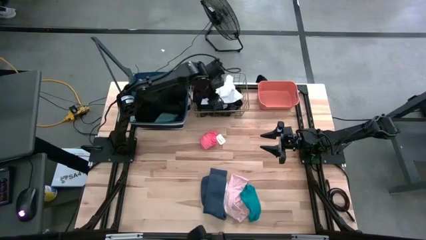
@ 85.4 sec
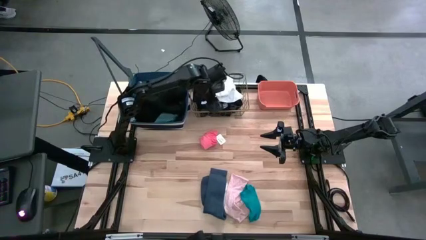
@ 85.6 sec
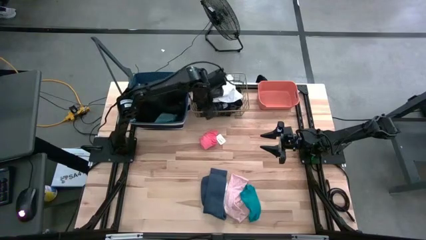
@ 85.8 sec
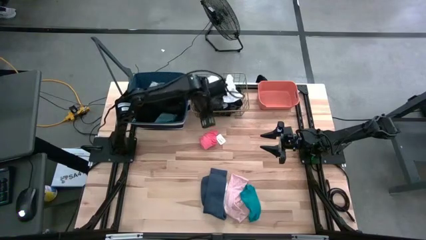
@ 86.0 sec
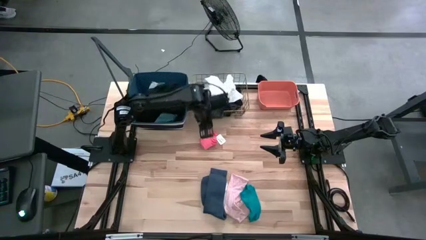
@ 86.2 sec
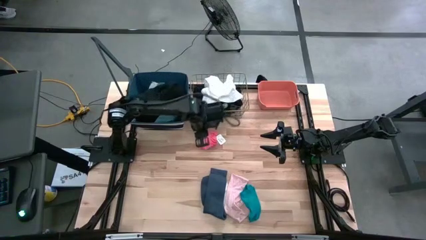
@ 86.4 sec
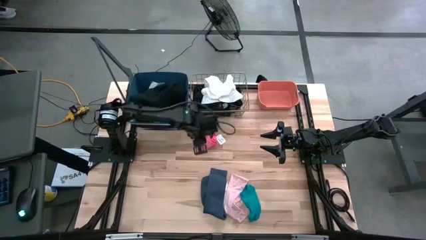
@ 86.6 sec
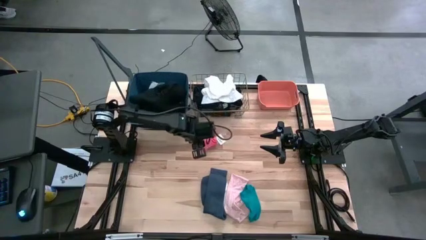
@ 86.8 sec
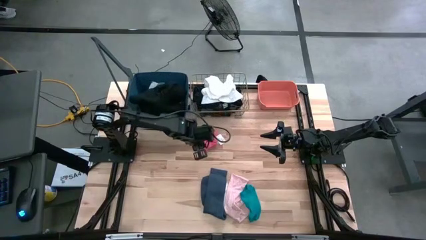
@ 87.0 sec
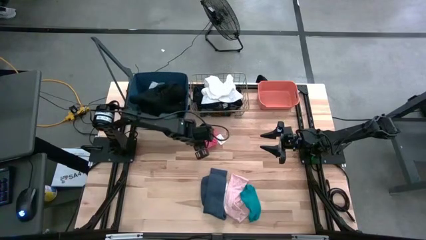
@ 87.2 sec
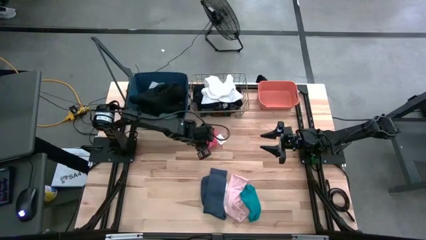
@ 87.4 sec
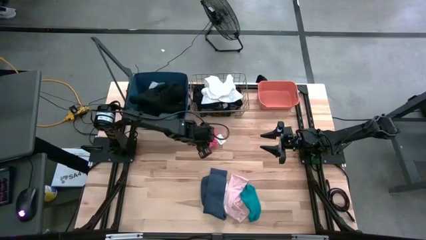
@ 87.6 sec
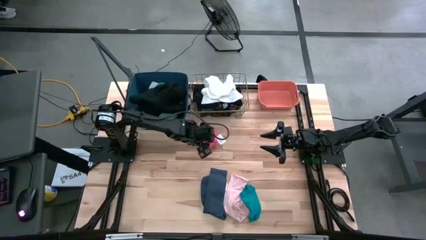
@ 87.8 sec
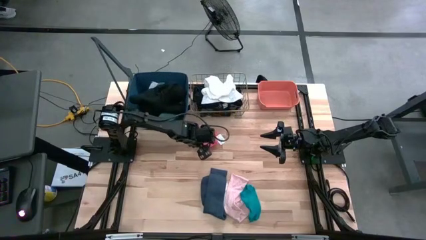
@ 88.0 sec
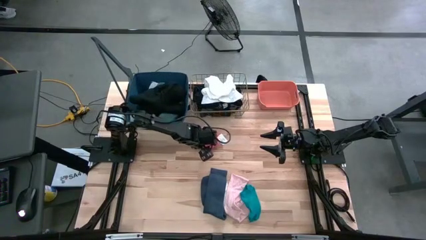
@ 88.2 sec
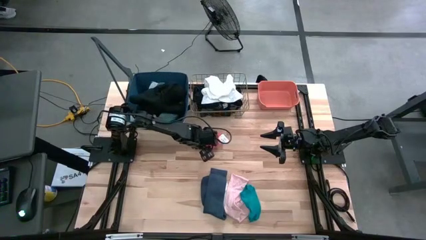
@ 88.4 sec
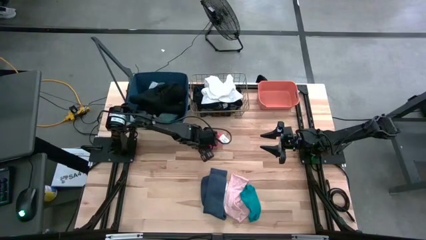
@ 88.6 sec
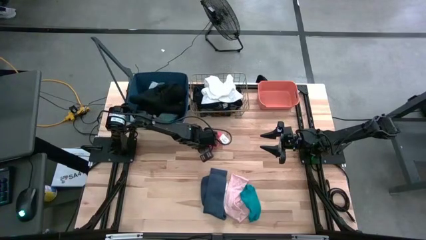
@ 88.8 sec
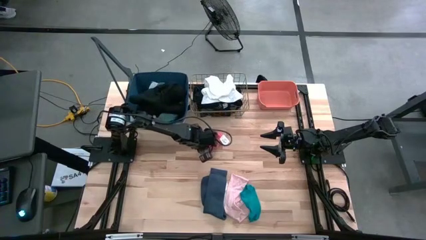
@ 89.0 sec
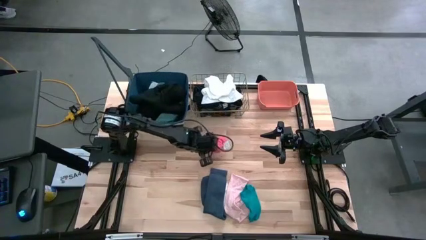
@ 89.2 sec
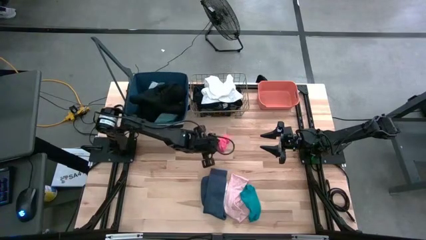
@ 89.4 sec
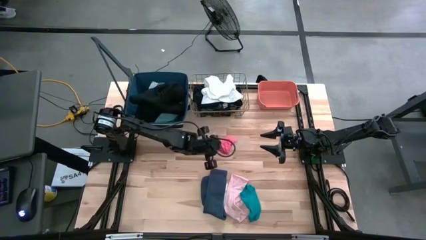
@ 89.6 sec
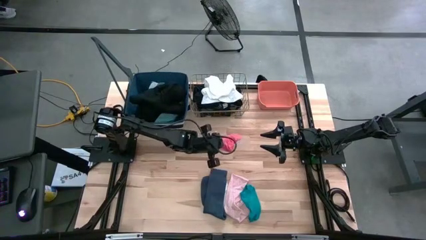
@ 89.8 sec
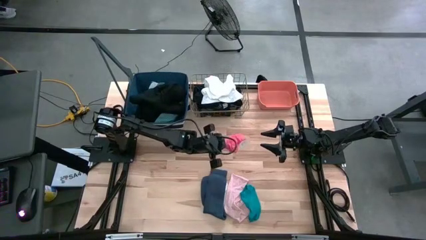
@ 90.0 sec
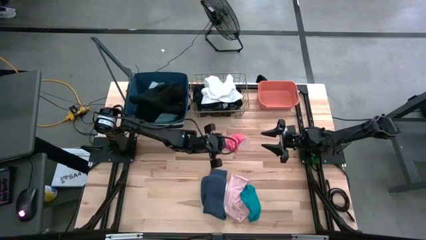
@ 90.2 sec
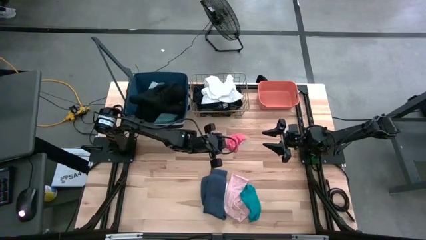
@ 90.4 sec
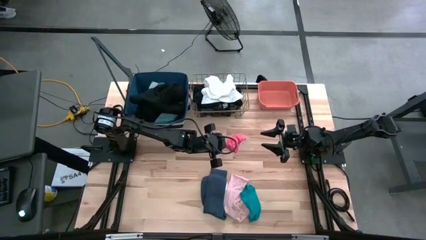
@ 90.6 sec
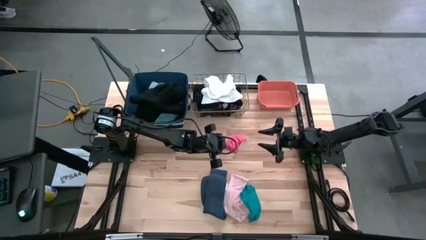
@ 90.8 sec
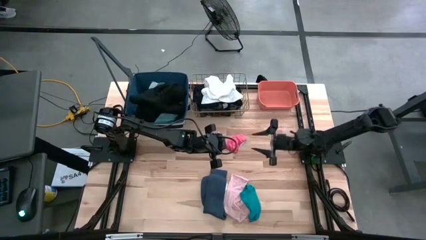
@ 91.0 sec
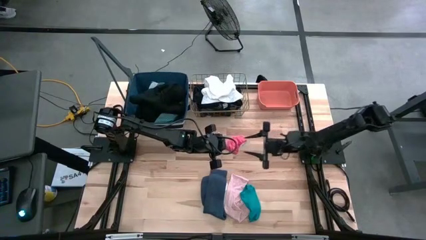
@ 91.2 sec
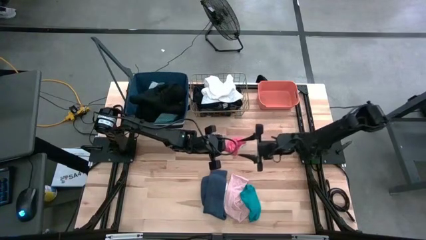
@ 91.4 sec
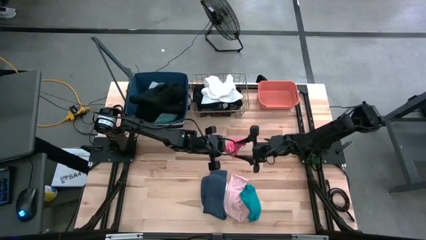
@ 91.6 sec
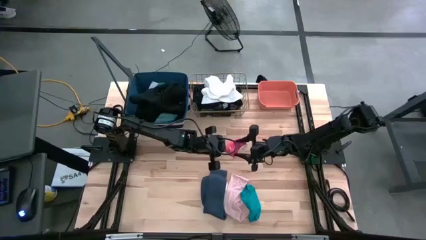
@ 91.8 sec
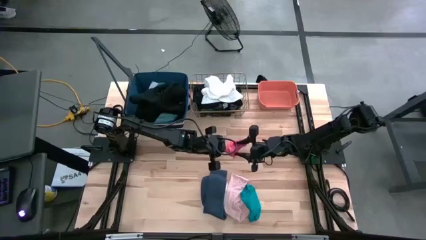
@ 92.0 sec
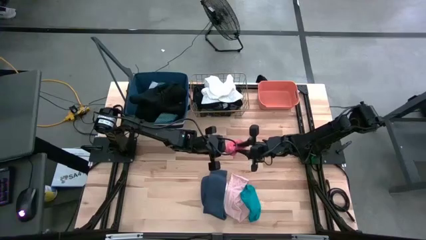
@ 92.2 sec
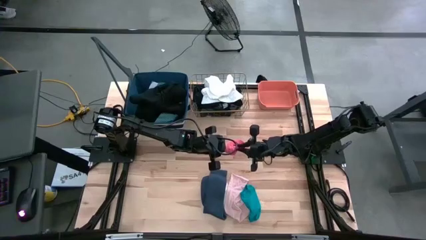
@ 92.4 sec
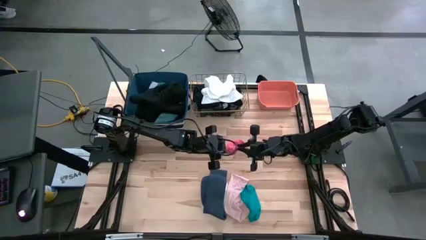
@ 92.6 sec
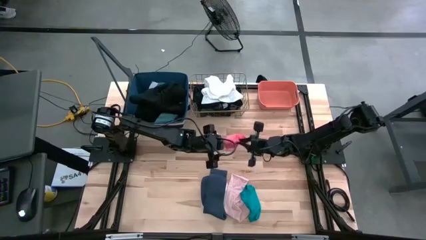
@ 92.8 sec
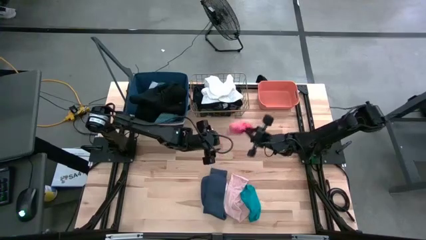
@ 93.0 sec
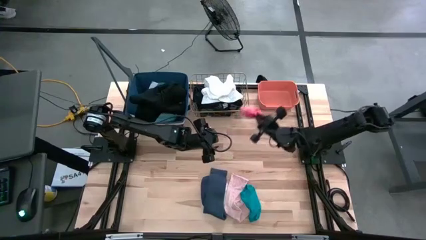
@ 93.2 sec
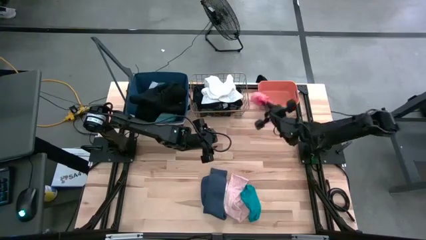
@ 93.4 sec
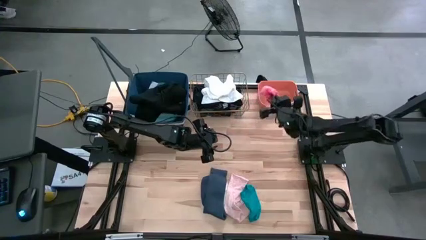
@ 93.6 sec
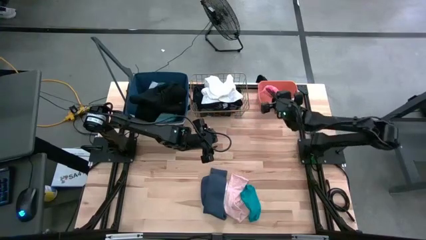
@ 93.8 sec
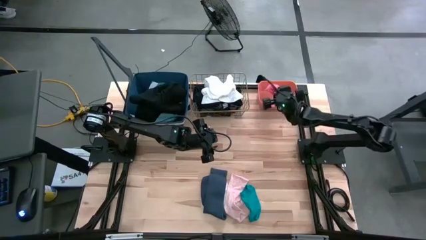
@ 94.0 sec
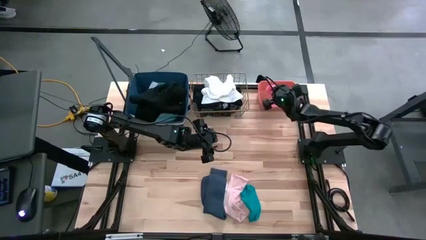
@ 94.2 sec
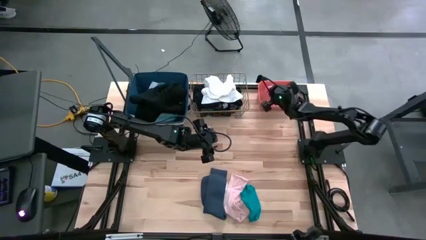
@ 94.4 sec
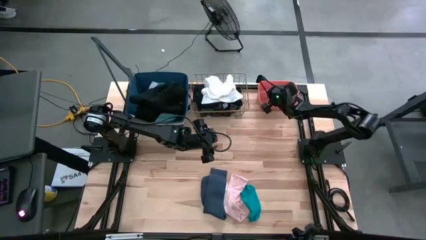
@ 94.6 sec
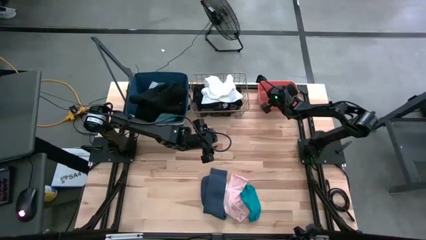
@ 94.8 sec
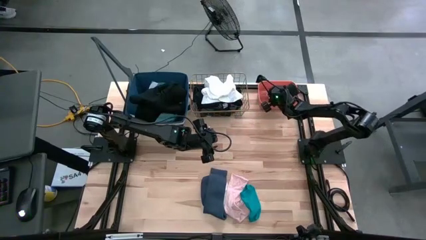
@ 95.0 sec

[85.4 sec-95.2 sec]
Task: Pick & Place Cloths
Put the orange sock into the orange bin

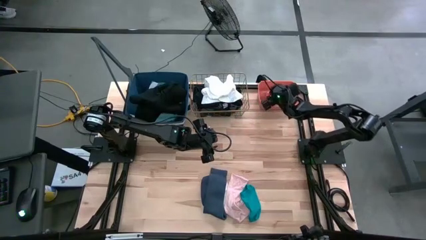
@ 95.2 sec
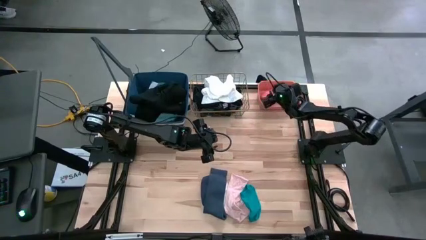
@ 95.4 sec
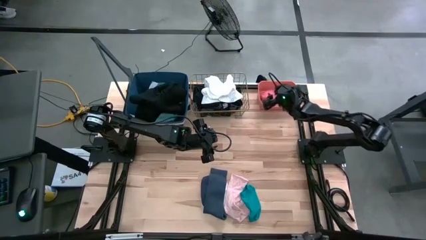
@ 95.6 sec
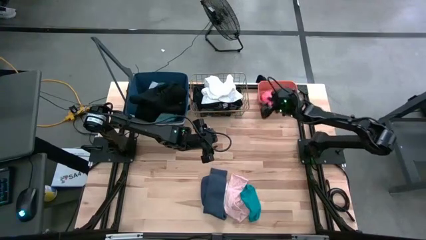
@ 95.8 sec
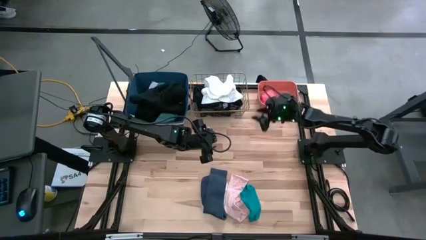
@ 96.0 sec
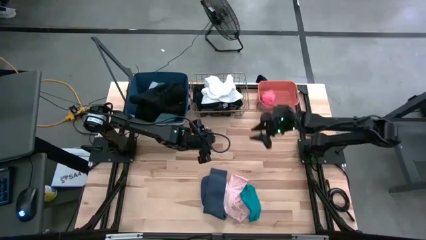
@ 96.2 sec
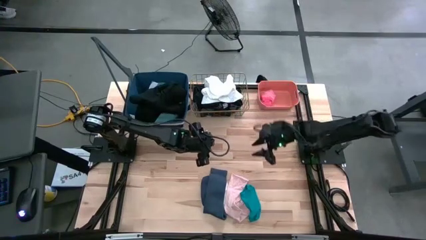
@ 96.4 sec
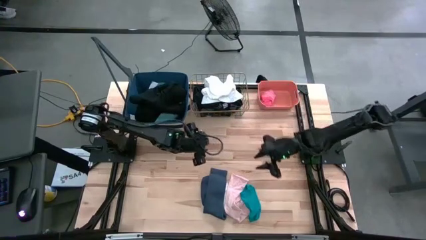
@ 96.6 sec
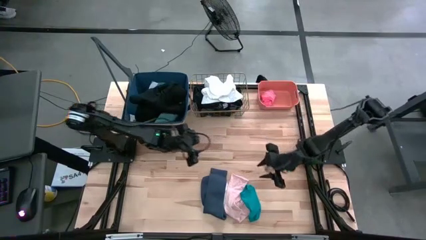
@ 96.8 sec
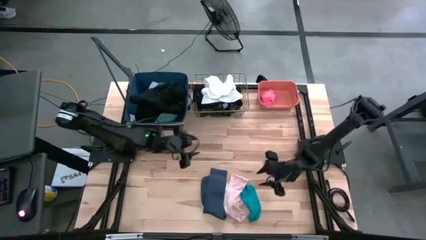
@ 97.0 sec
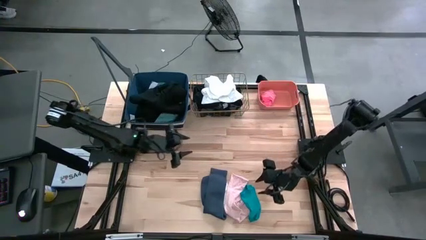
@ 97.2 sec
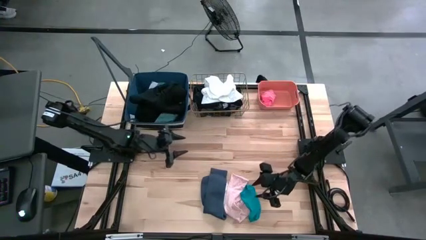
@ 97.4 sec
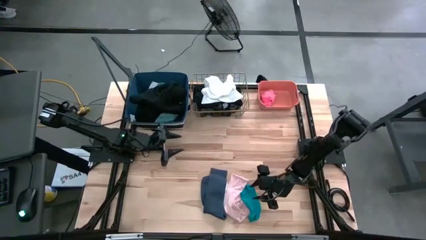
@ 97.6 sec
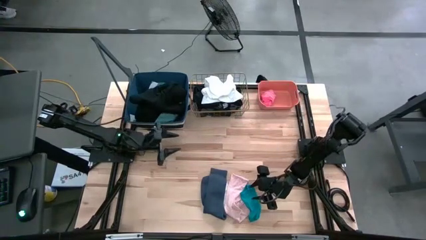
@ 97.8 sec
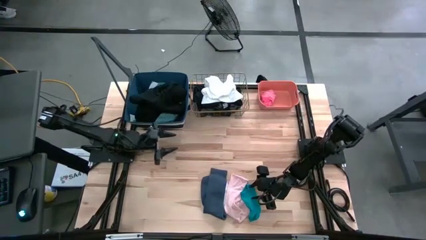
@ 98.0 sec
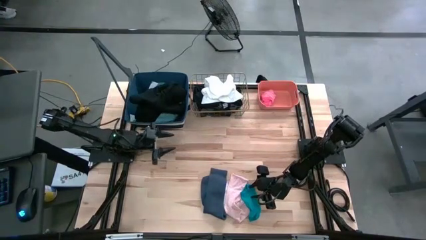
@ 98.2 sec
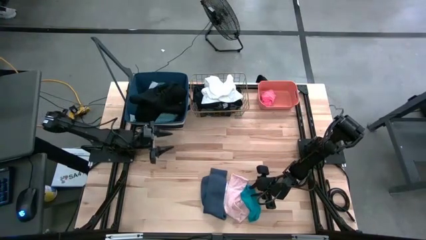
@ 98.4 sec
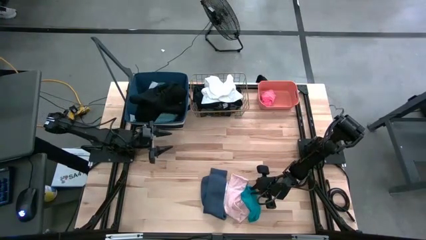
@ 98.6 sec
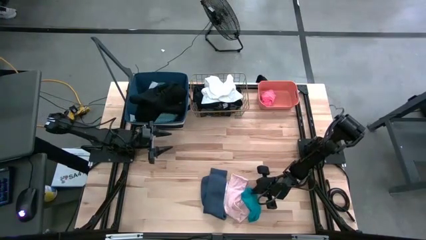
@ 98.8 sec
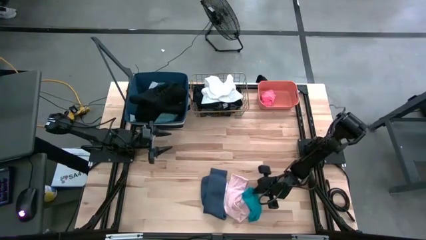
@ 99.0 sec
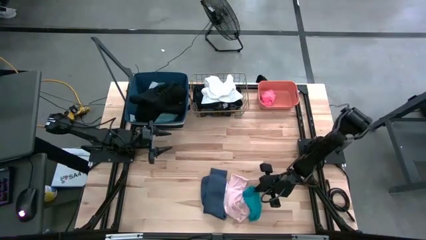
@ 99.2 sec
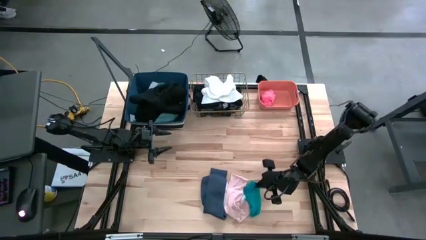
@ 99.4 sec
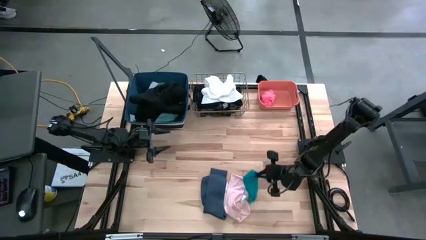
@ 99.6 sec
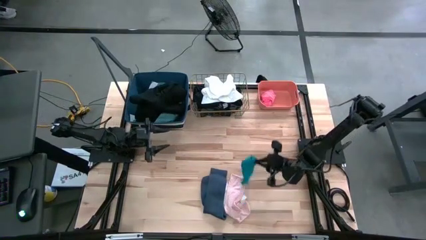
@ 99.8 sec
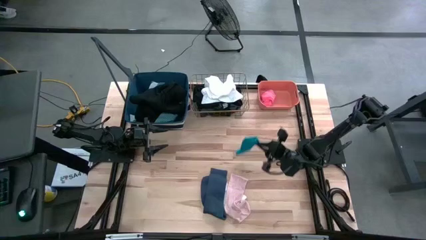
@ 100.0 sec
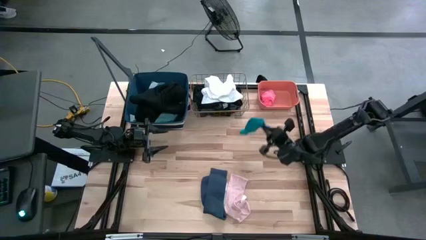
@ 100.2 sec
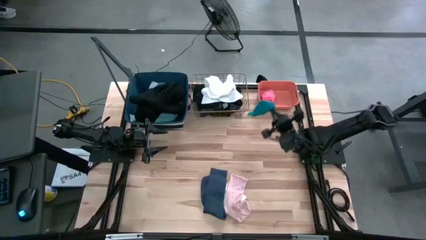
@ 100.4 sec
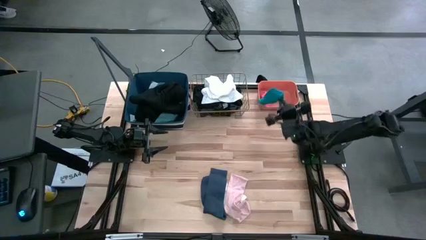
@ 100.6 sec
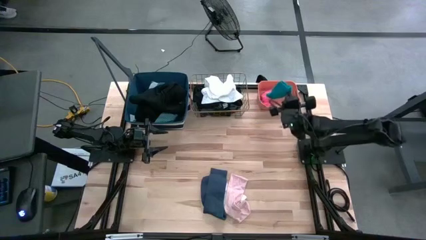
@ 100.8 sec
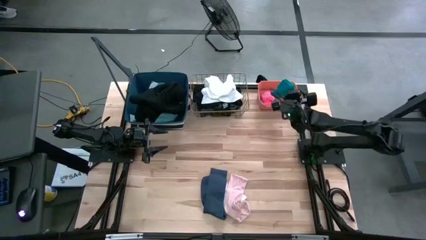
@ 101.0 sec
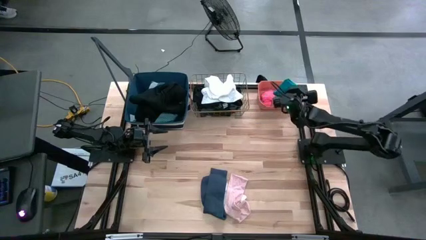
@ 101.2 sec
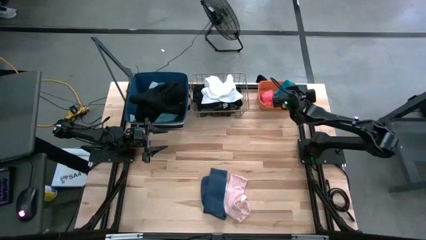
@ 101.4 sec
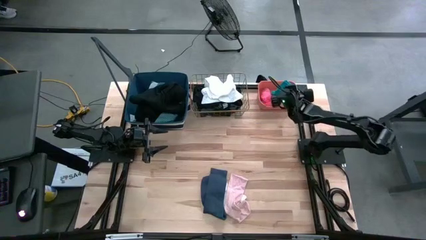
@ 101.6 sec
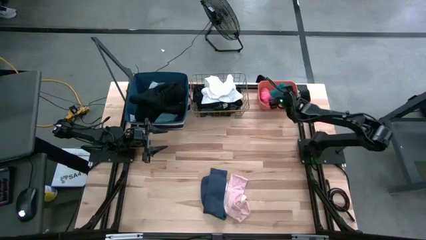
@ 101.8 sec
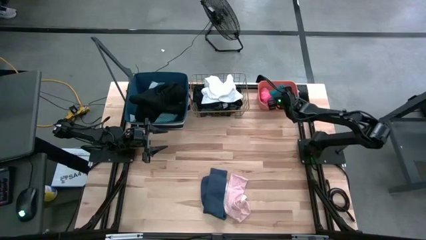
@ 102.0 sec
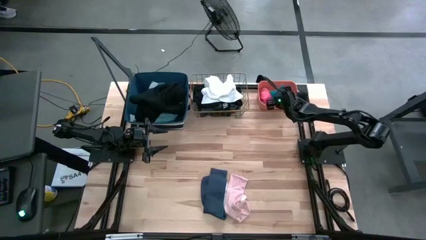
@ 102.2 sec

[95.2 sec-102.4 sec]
Put the blue sock into the orange bin
